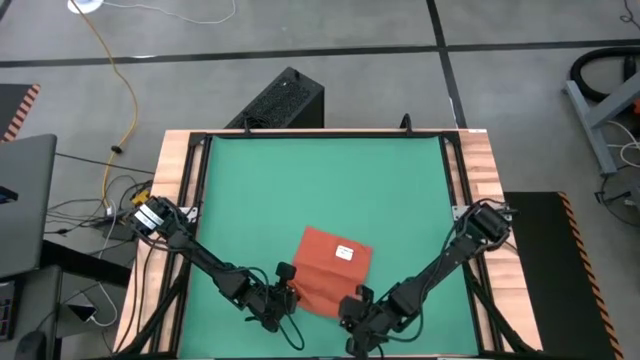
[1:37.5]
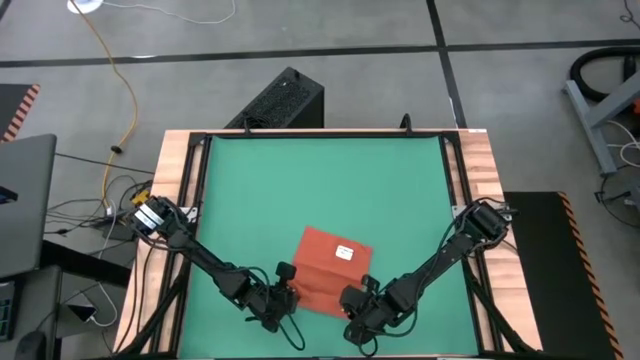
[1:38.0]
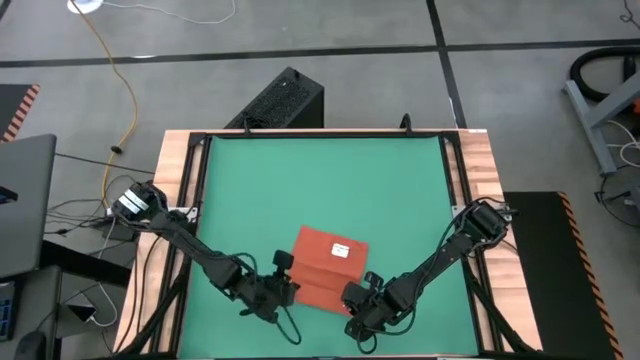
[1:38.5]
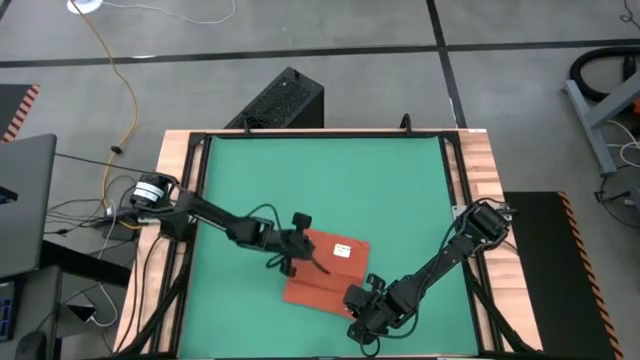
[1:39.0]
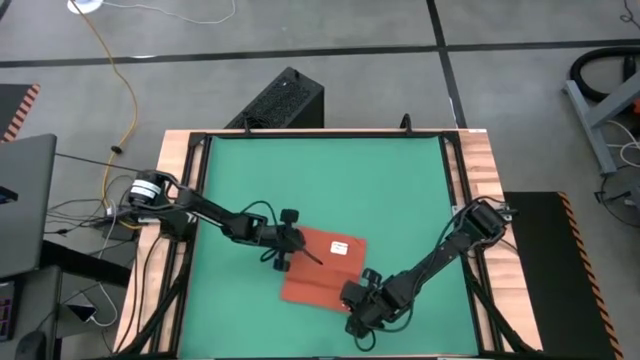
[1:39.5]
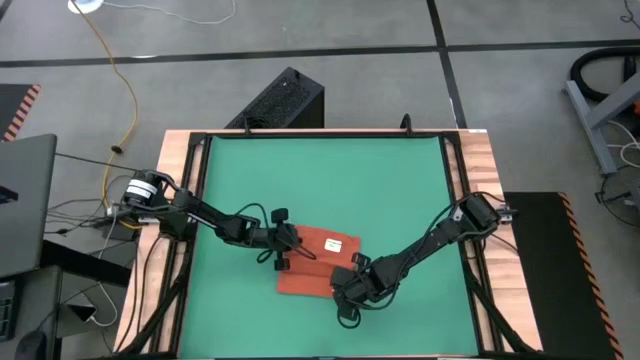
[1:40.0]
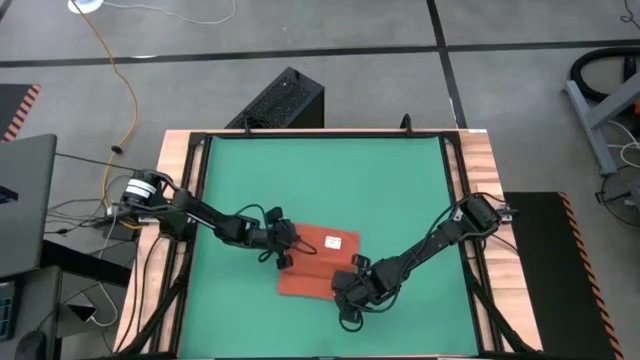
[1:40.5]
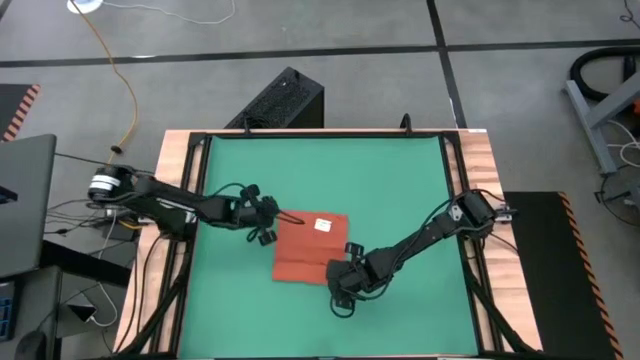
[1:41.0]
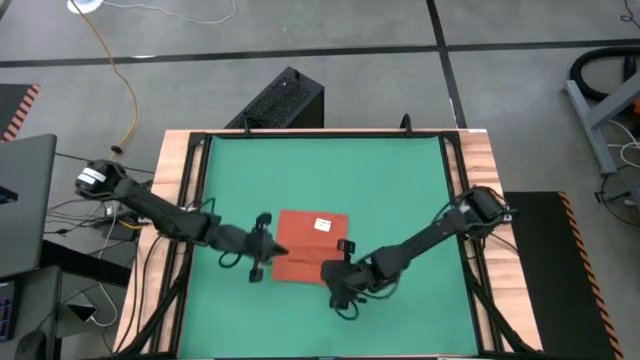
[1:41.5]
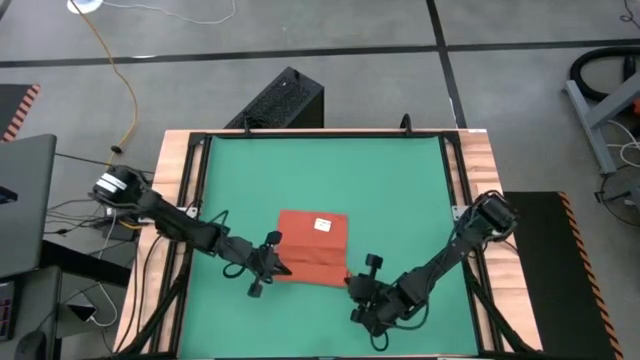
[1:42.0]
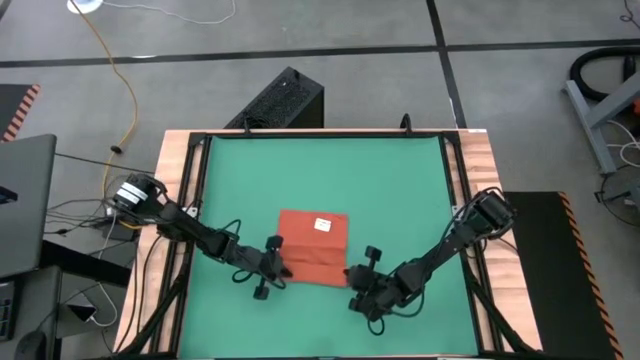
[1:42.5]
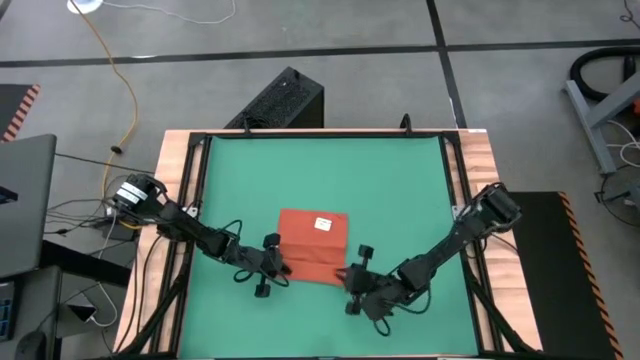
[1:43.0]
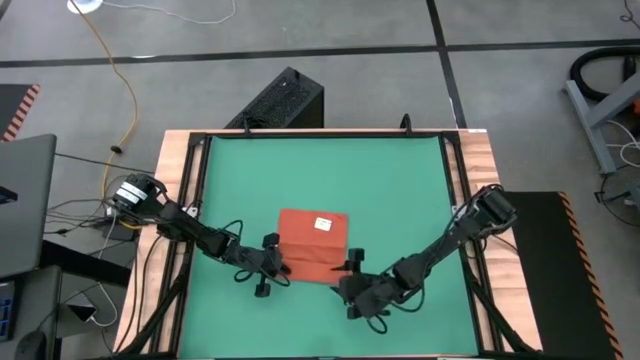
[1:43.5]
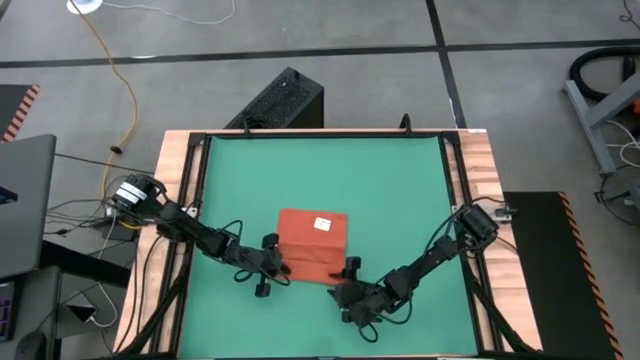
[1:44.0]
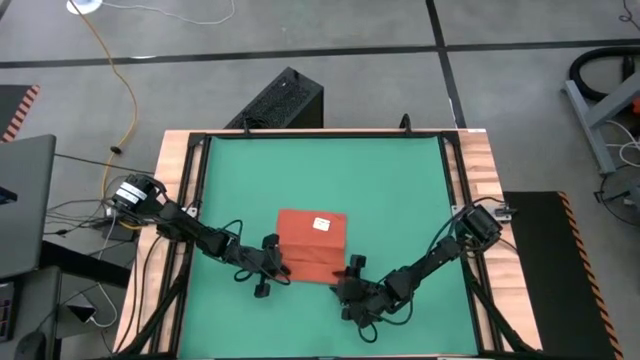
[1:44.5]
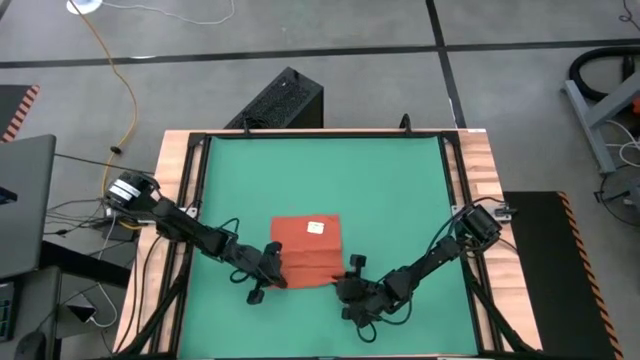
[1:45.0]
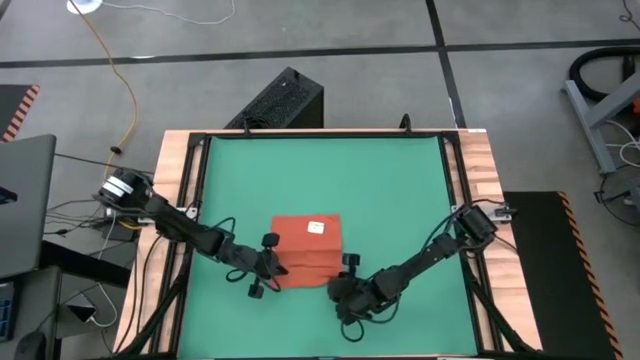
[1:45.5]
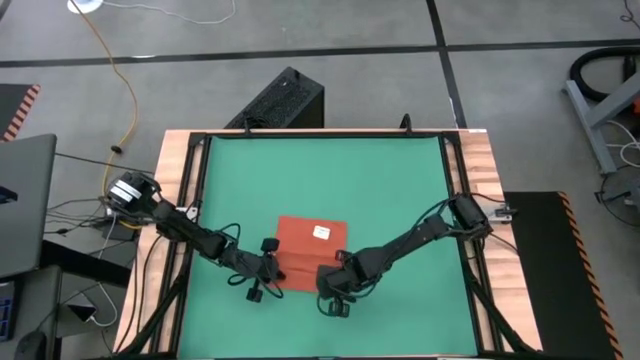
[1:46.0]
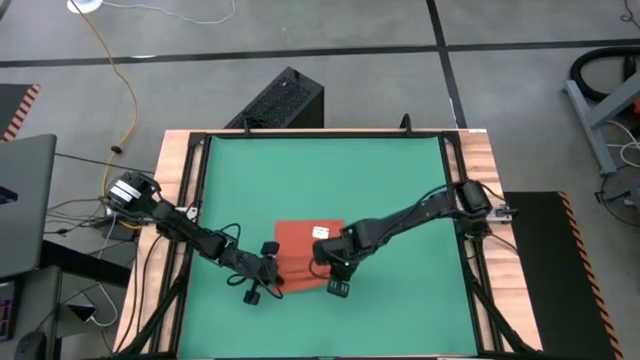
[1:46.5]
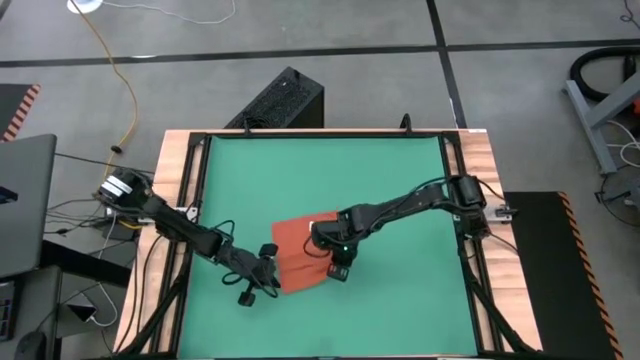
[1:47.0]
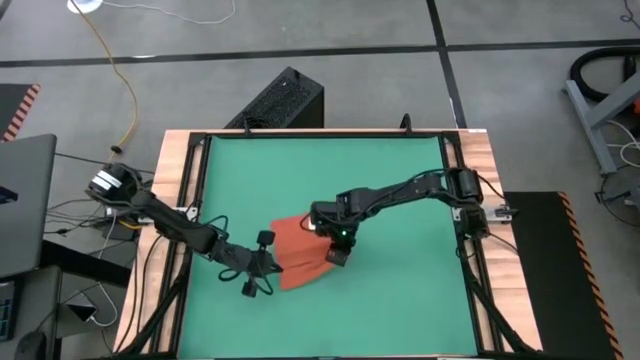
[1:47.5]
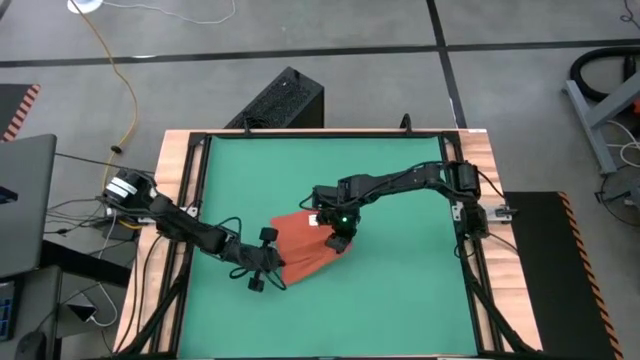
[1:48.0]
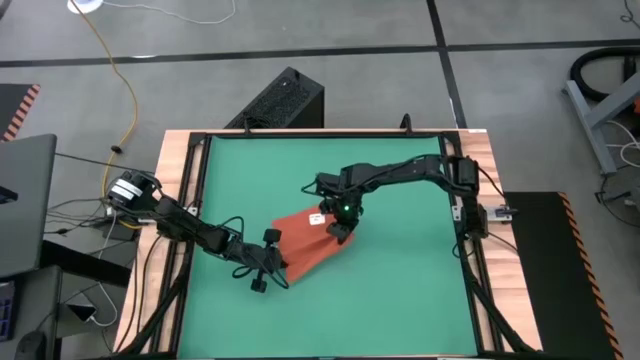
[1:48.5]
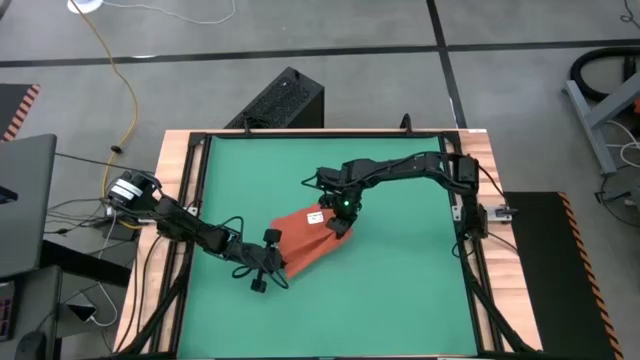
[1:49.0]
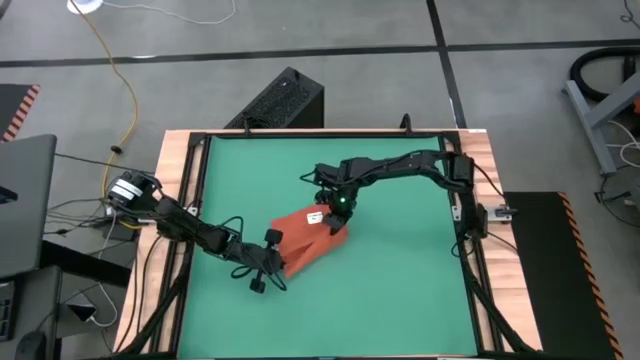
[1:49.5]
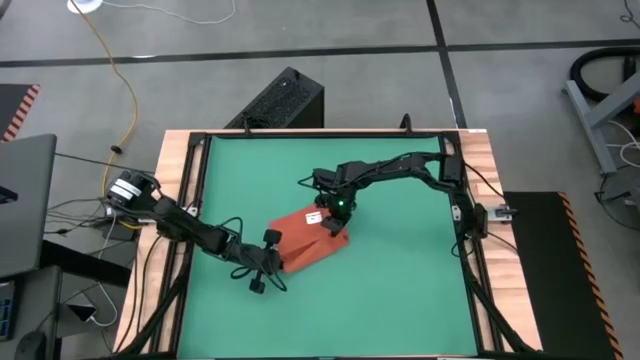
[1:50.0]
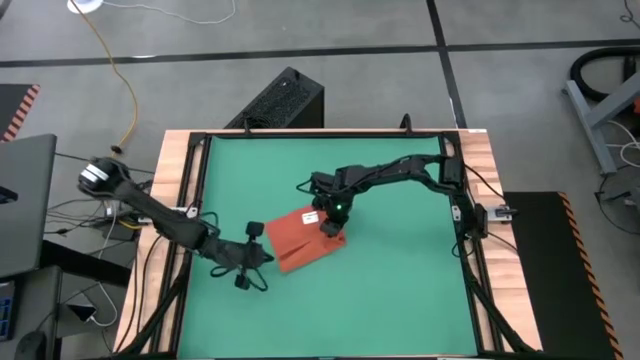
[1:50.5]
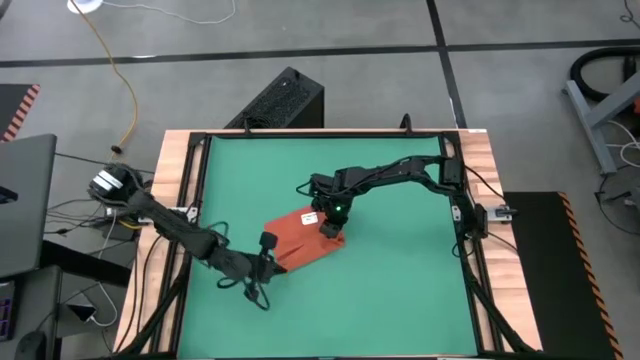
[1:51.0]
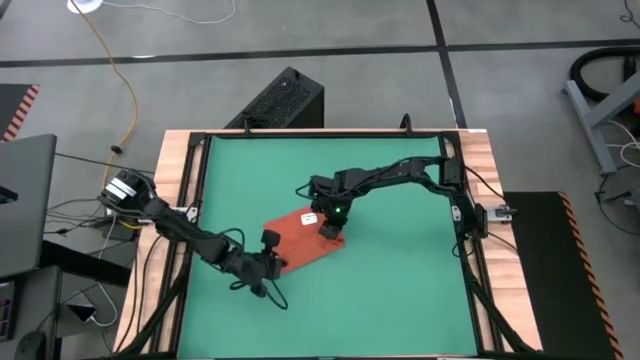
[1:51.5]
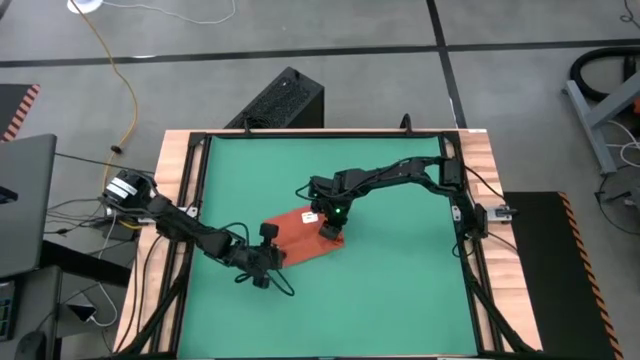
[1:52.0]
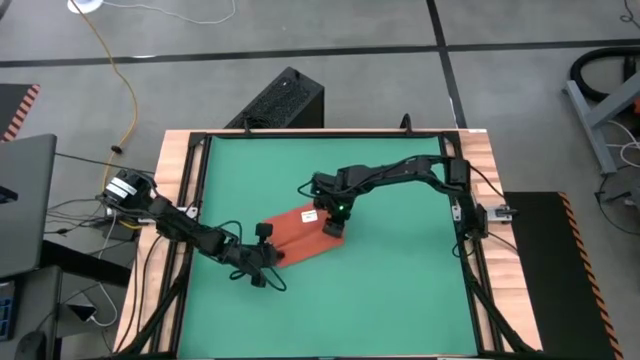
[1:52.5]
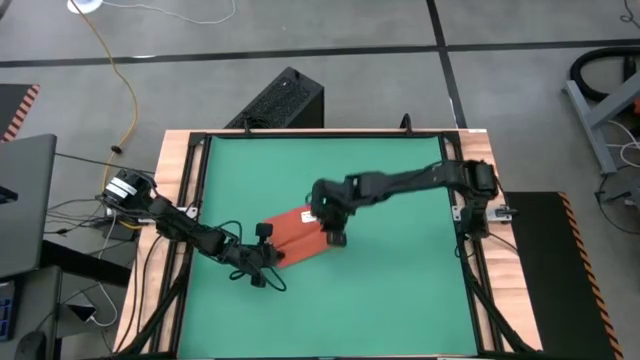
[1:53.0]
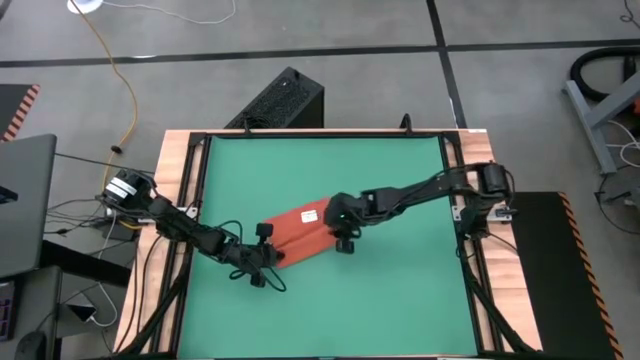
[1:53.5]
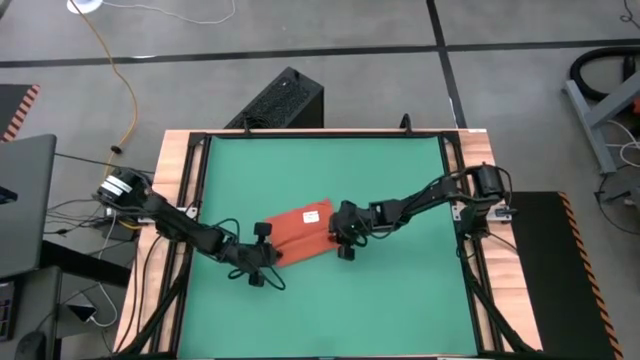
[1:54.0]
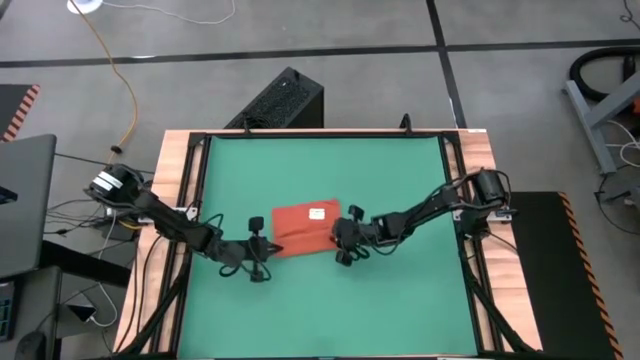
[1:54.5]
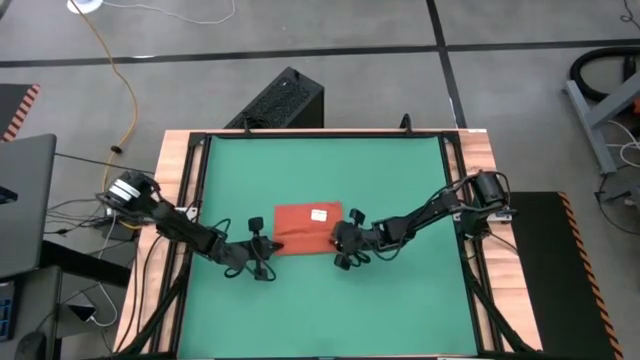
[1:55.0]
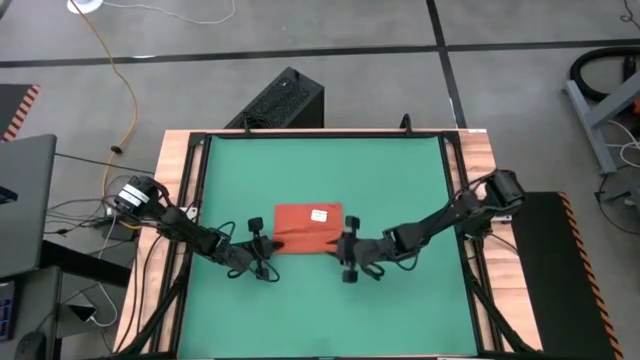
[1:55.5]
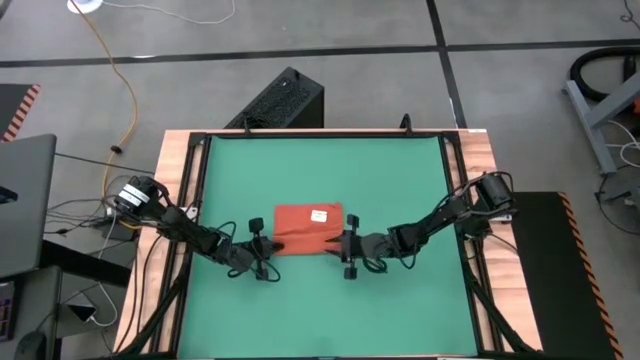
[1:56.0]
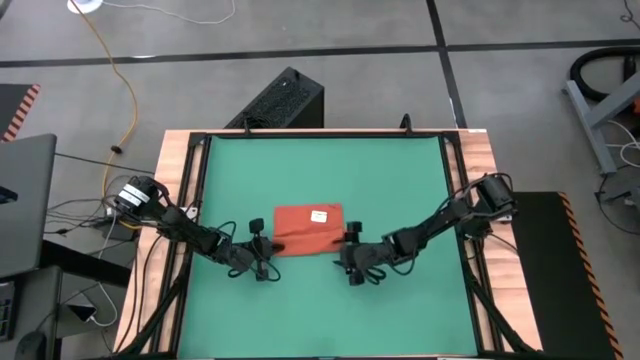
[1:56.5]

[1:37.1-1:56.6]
Task: Roll towel
Roll the orange towel

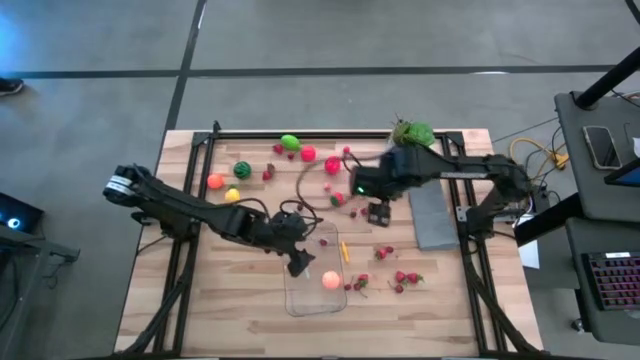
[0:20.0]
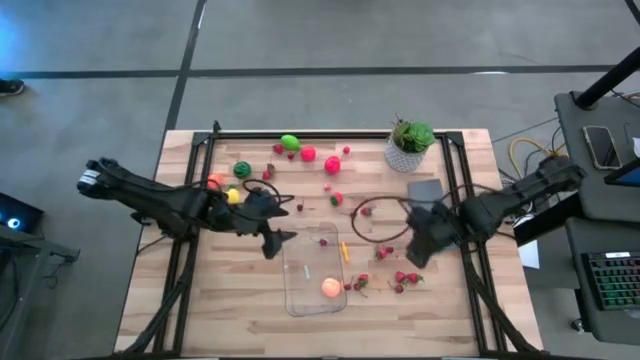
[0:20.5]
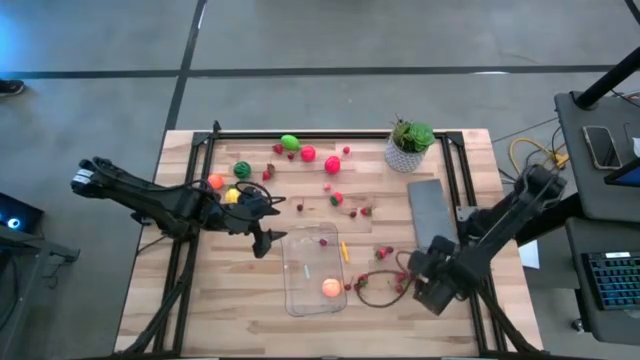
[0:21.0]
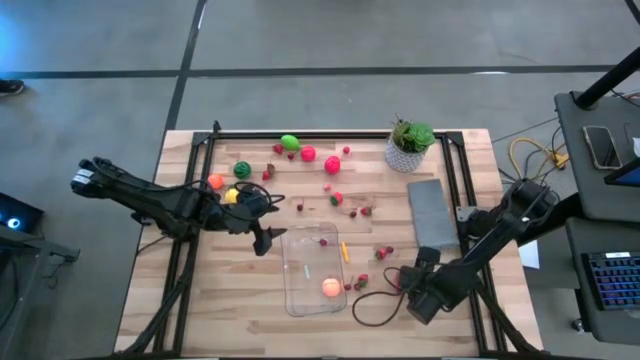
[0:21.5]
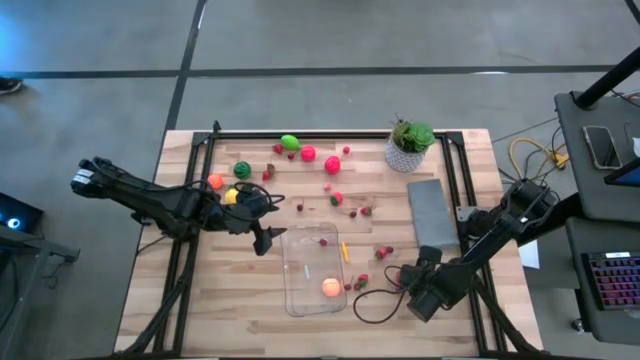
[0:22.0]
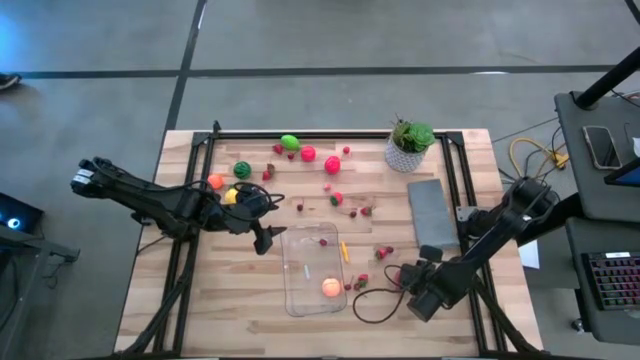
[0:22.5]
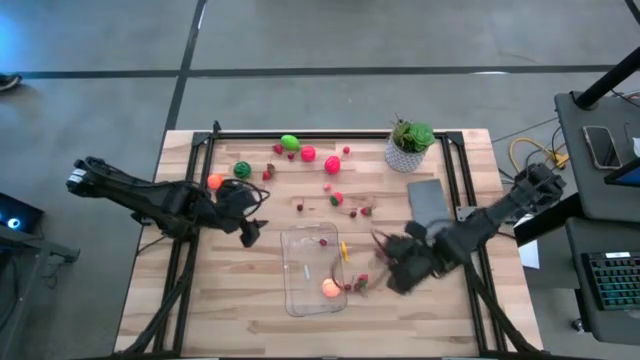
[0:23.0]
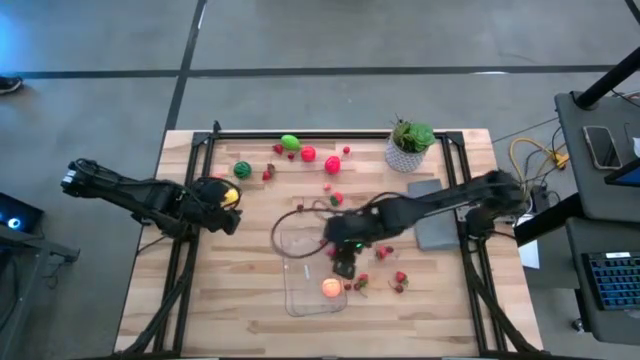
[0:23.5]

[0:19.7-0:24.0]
Task: Pick and placing Produce into tupperware
Put the red strawberry into the transparent bin
